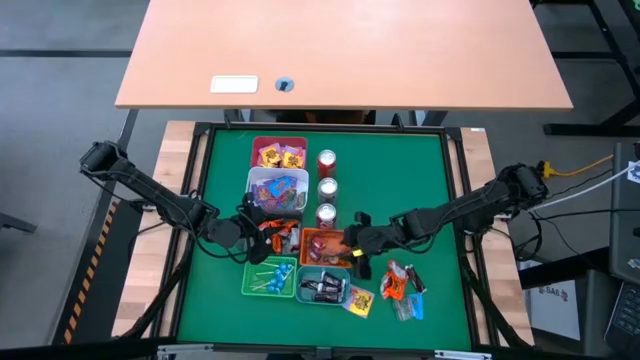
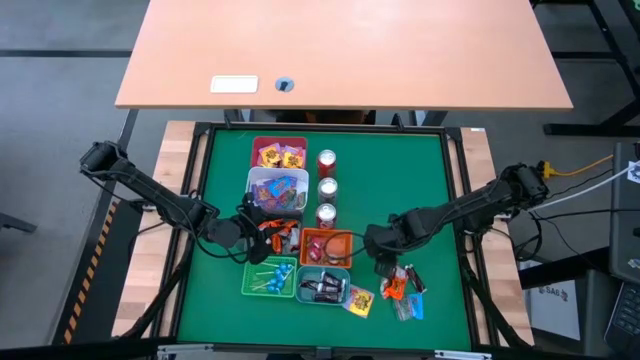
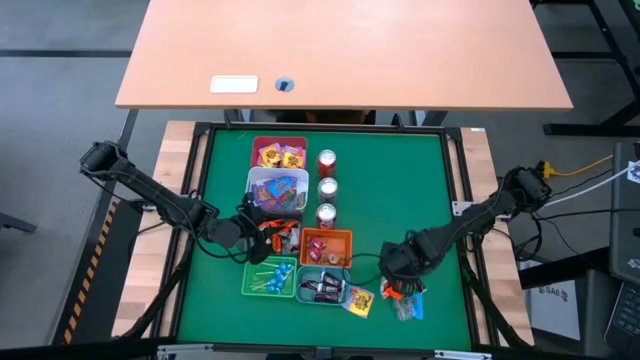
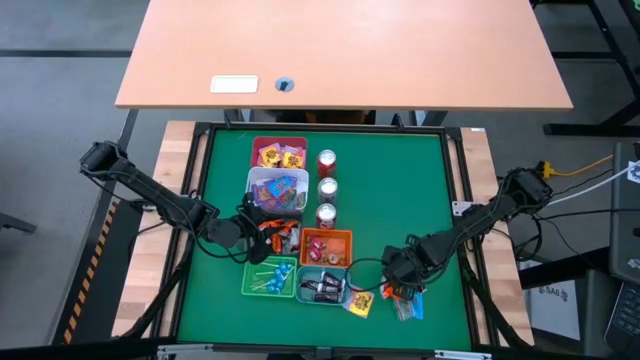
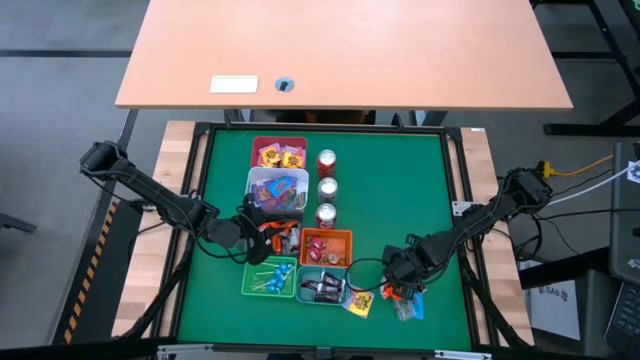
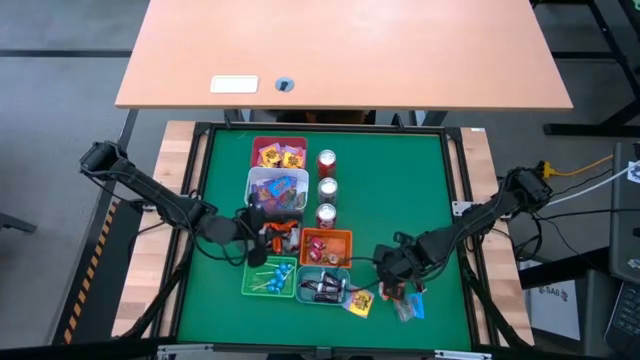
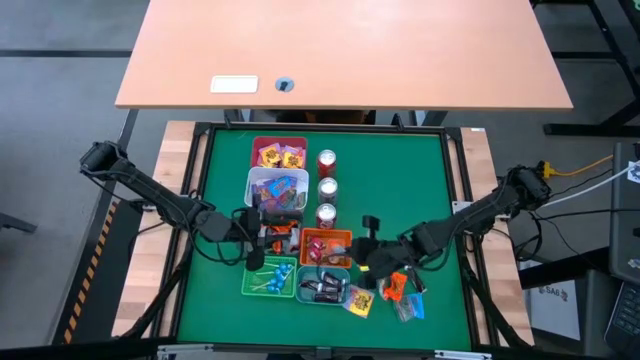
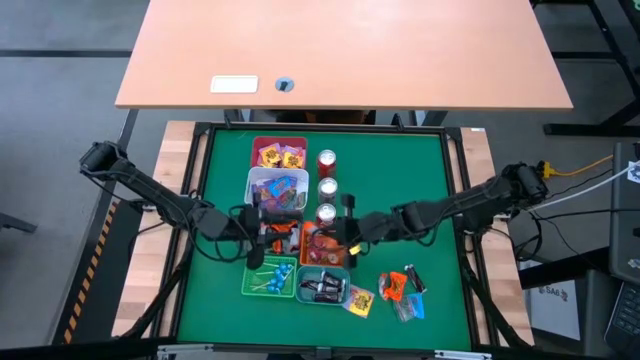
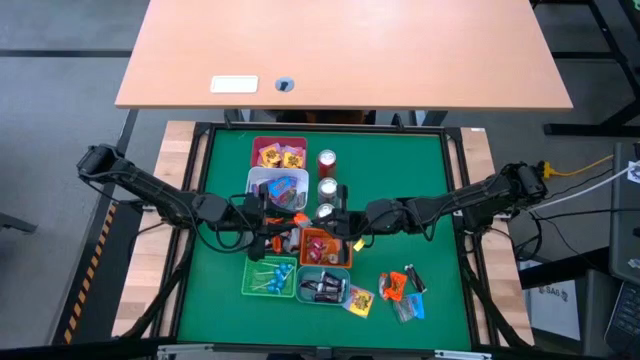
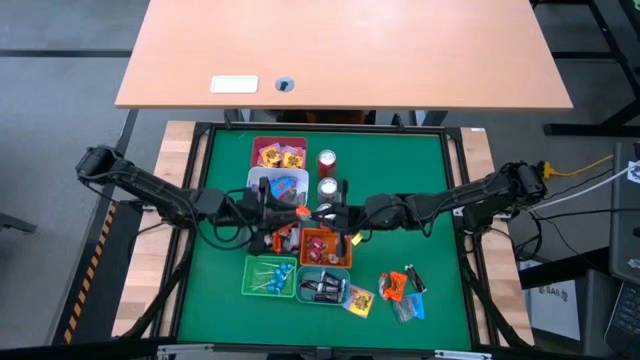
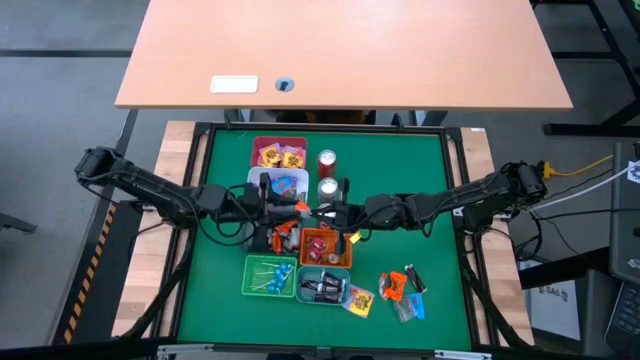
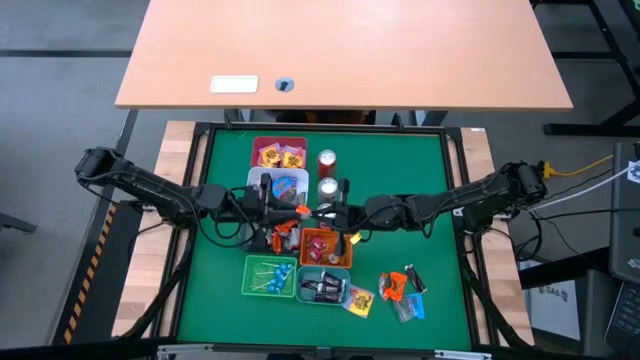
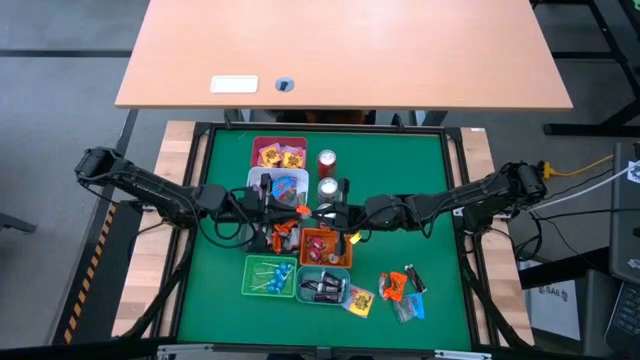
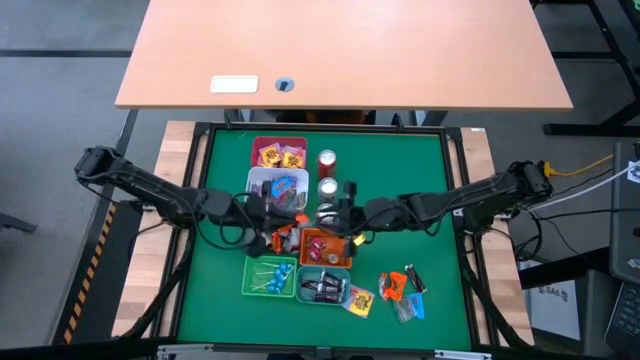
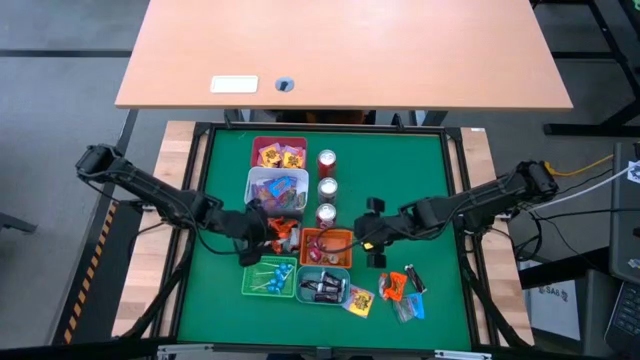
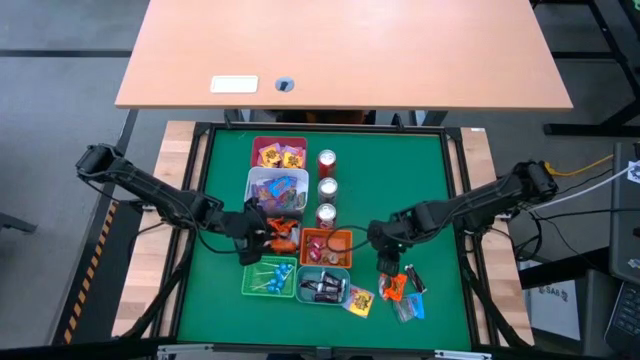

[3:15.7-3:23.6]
Task: Sort candy
Put the orange chocolate into the black bin

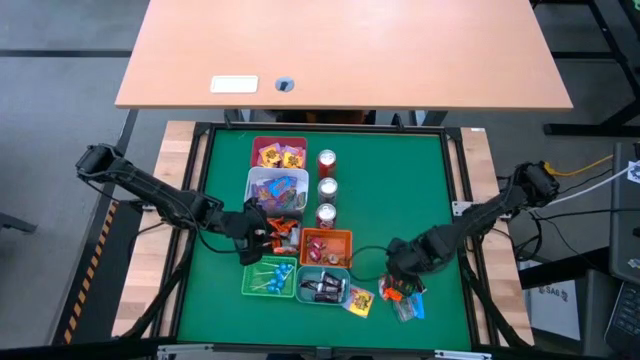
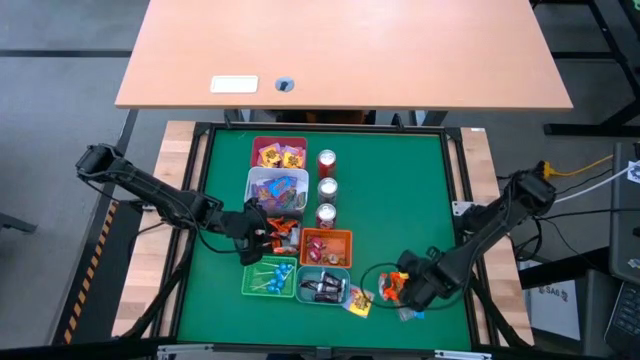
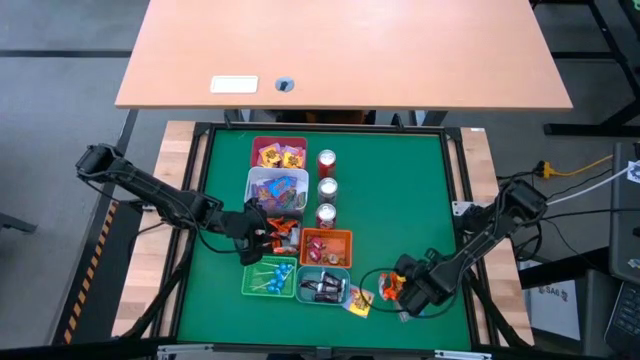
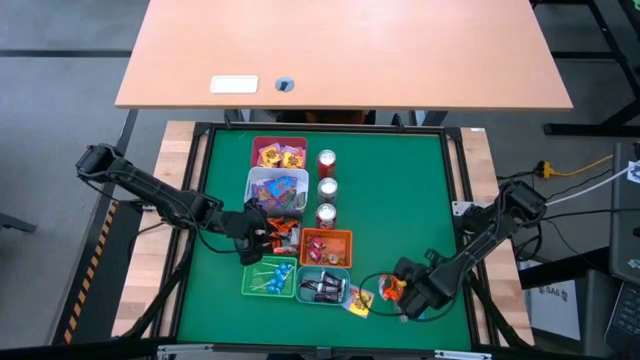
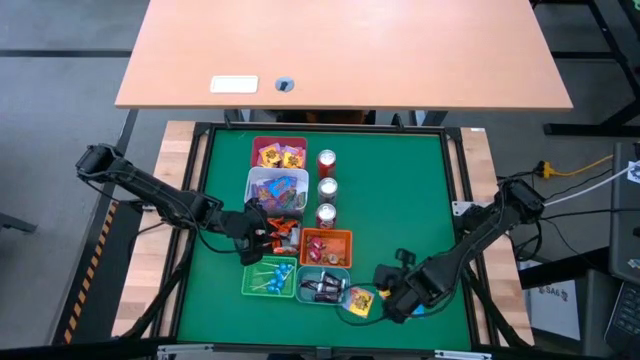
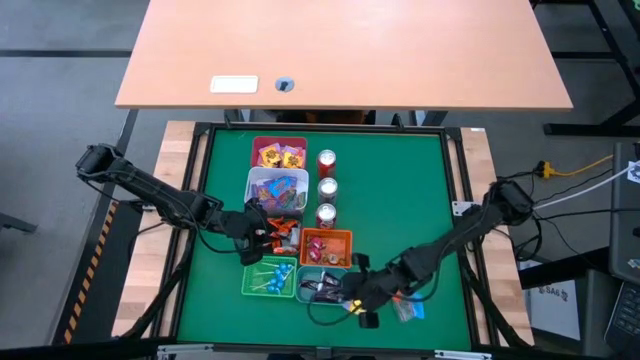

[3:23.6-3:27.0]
Put the brown candy into the teal green bin

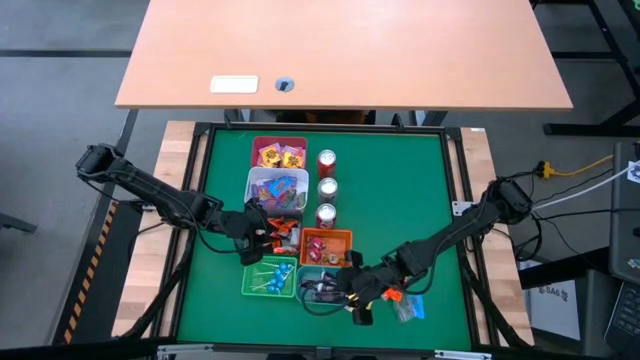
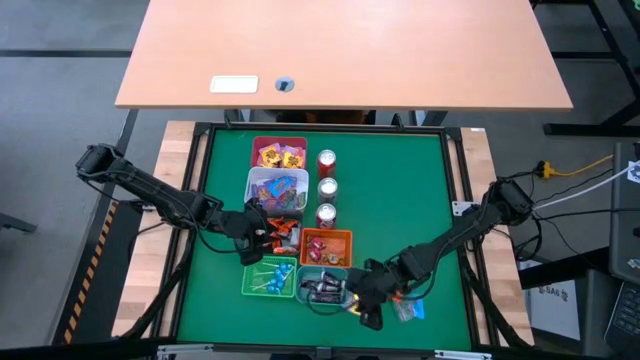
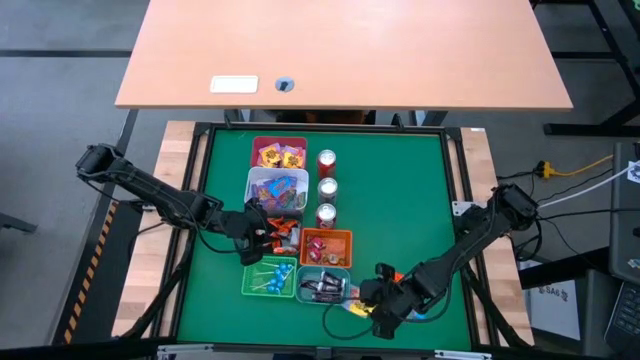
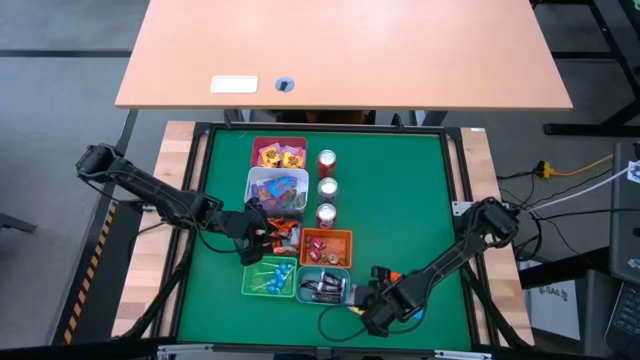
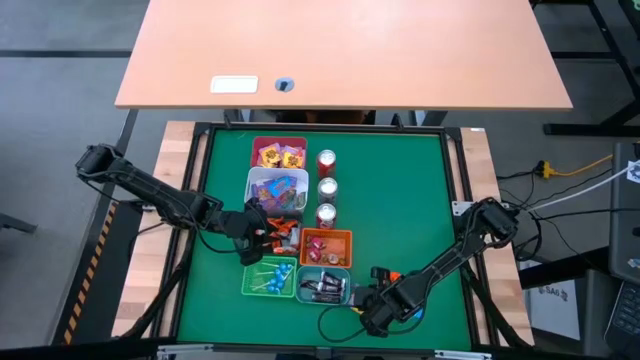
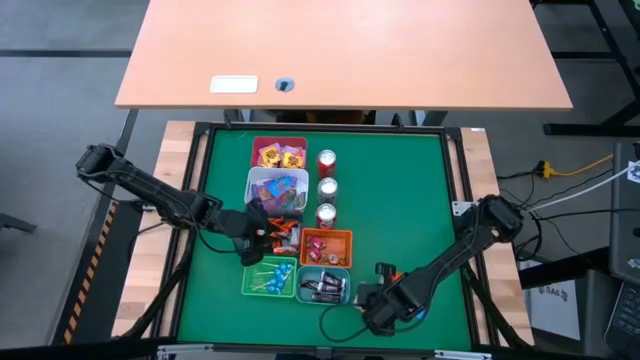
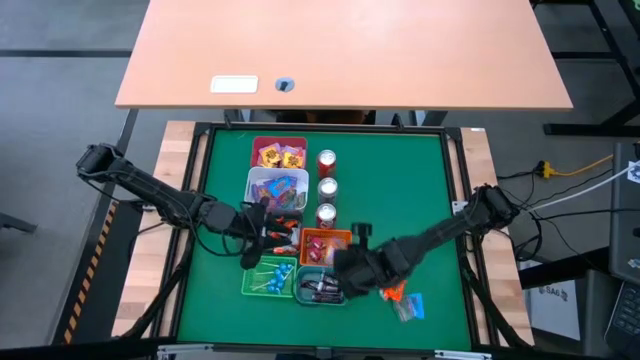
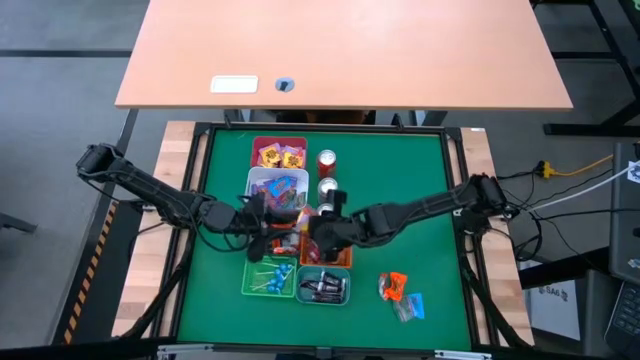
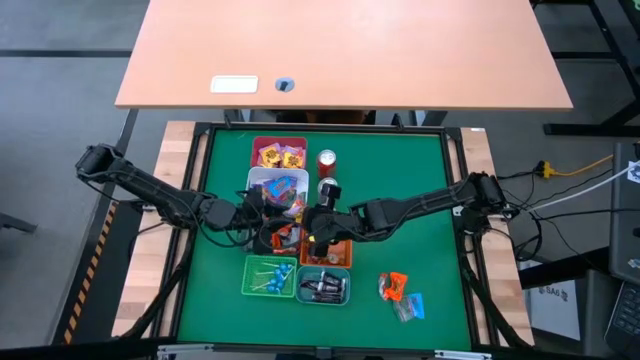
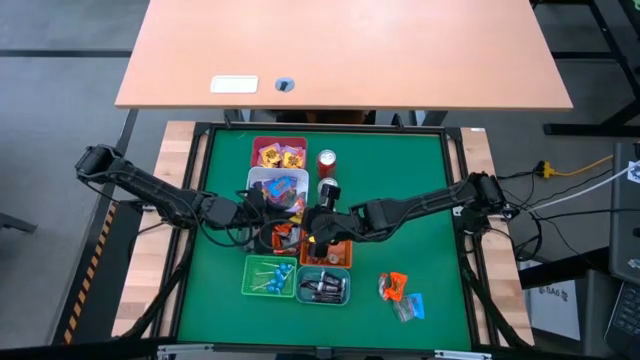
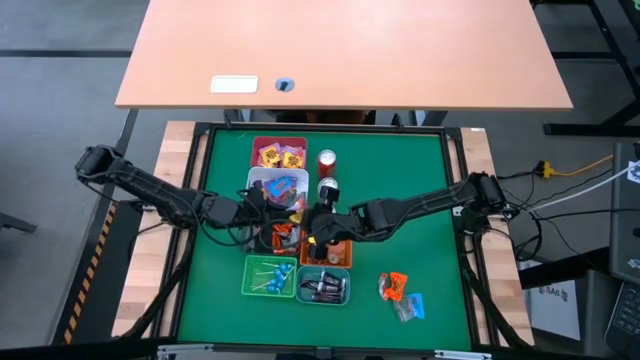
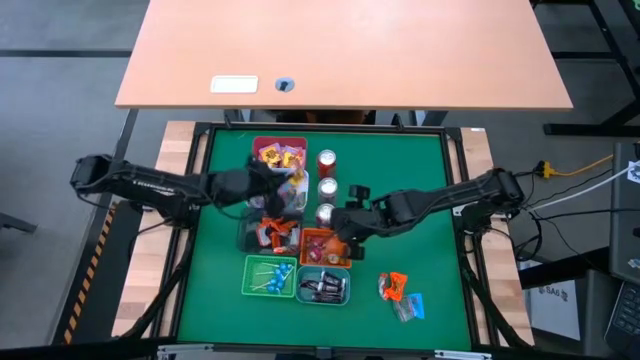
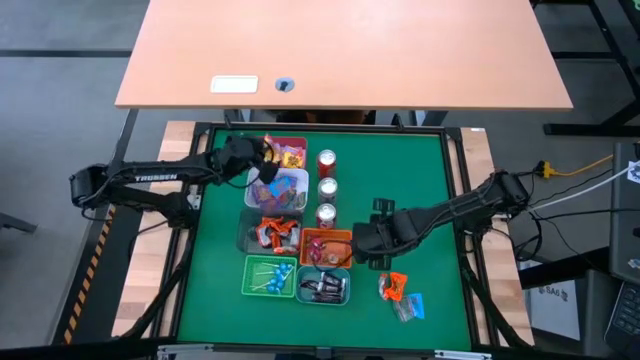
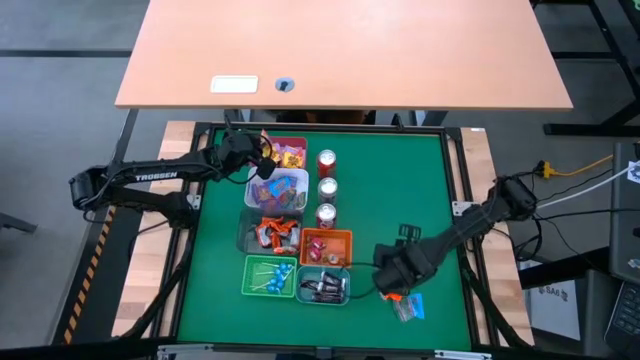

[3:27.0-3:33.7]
Put the yellow candy into the red bin

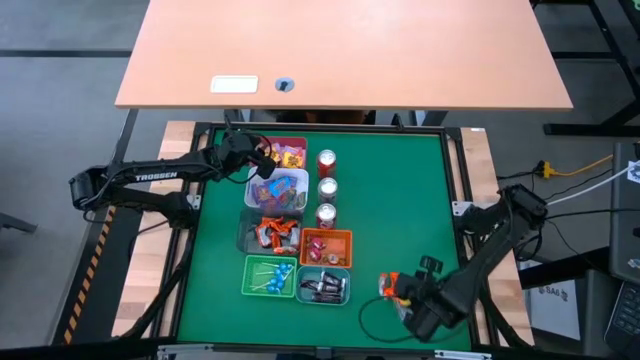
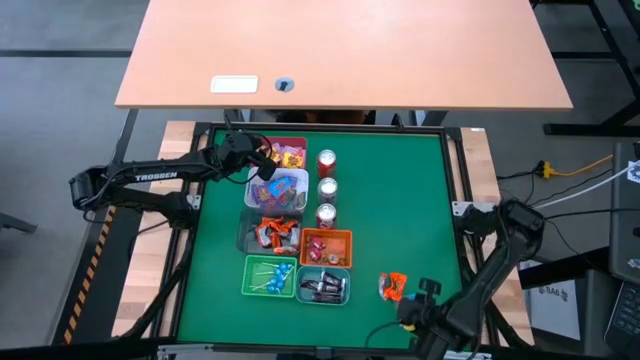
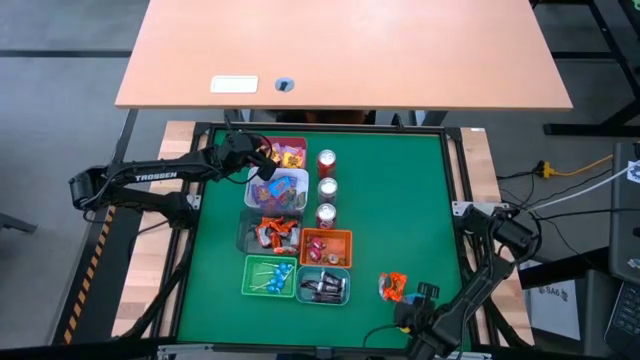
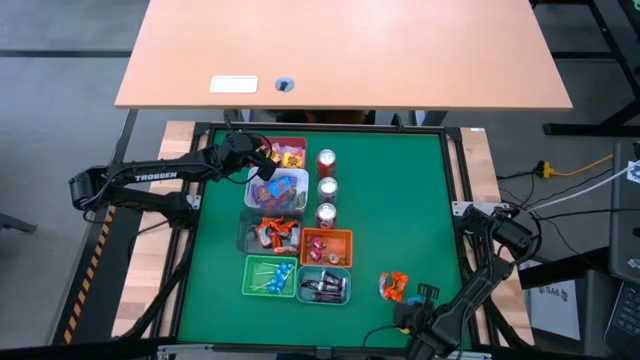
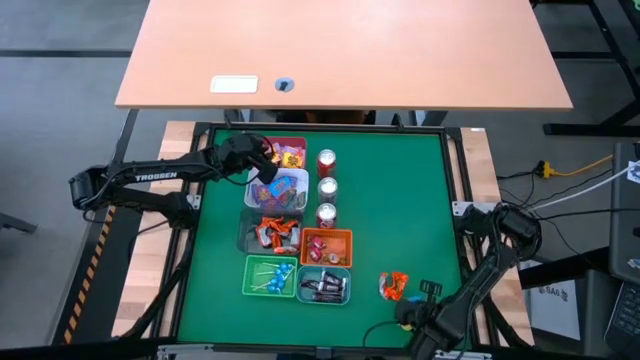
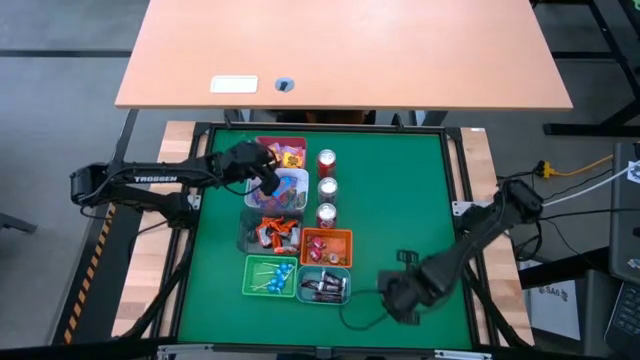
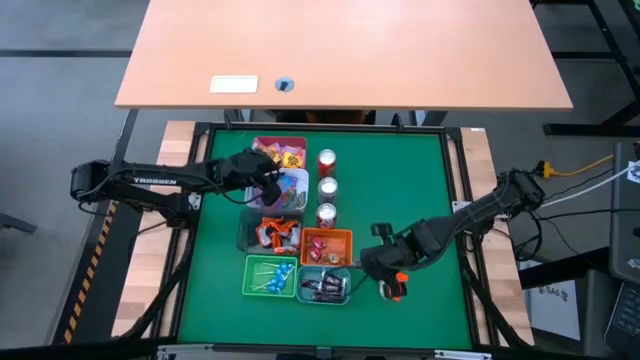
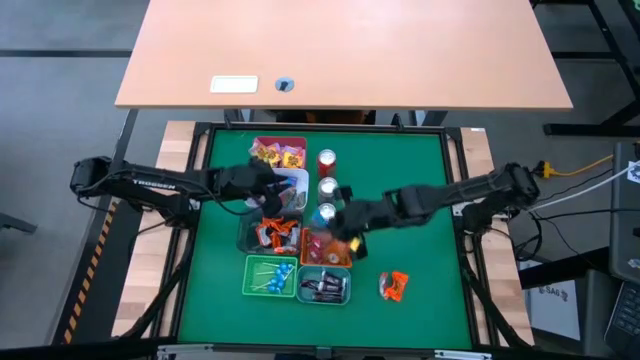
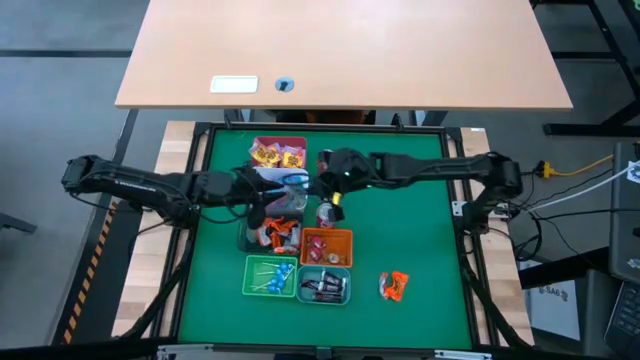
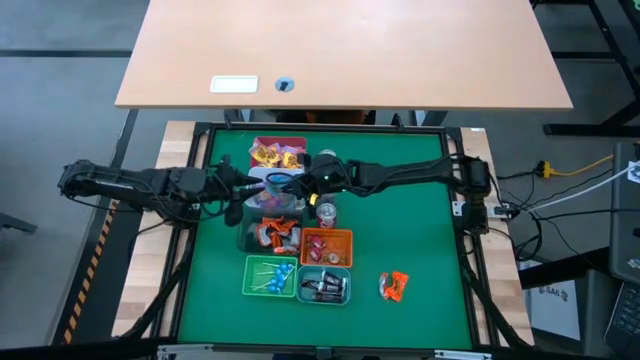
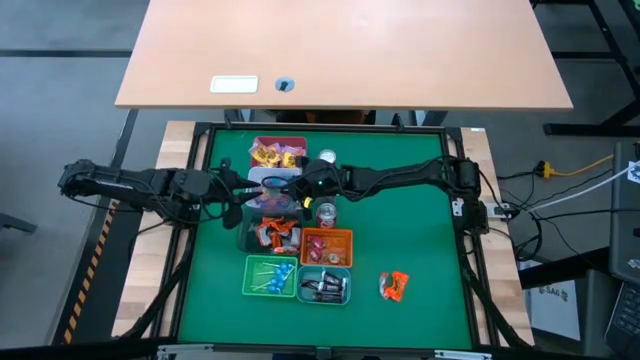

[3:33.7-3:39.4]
Put the violet candy into the white bin
